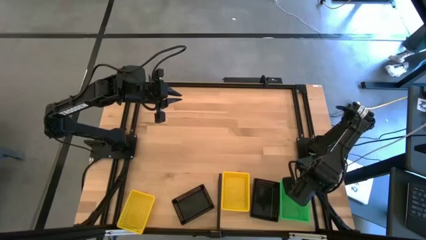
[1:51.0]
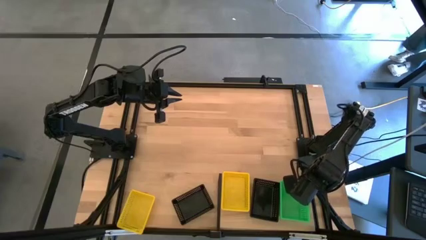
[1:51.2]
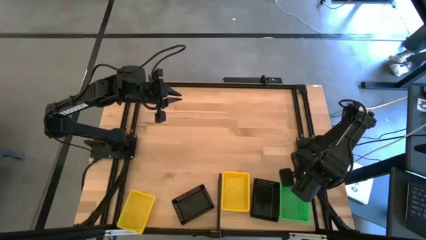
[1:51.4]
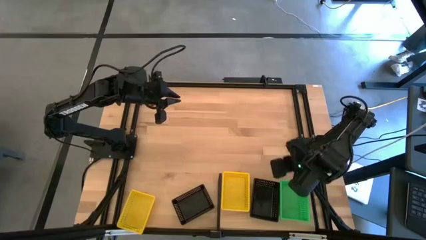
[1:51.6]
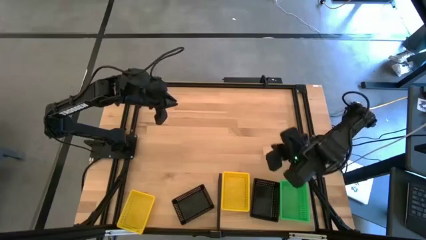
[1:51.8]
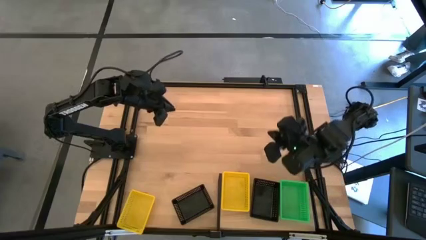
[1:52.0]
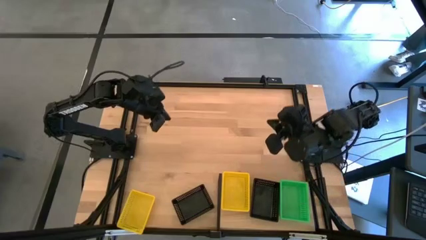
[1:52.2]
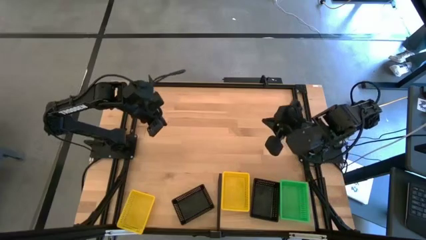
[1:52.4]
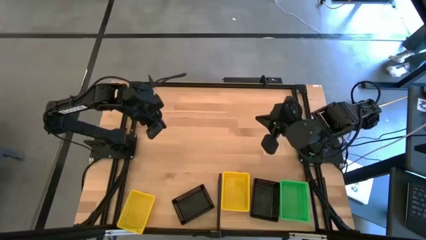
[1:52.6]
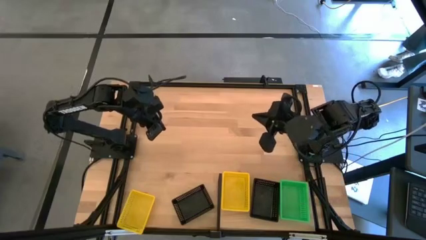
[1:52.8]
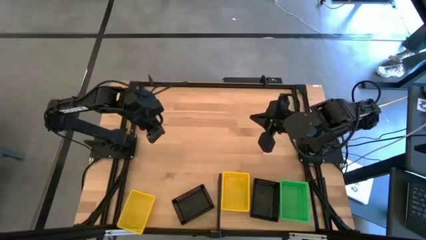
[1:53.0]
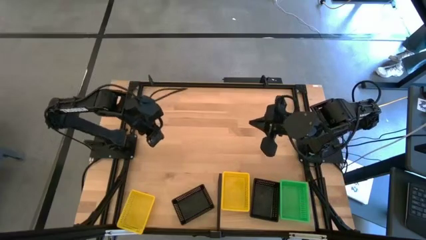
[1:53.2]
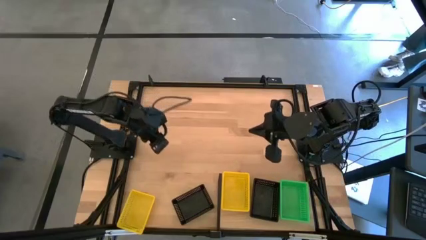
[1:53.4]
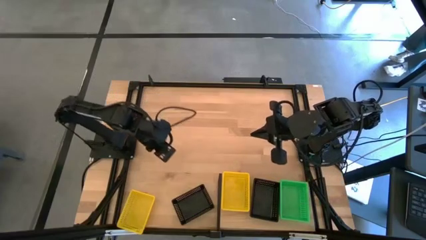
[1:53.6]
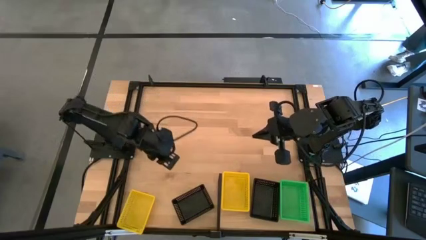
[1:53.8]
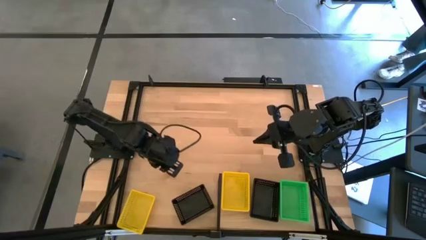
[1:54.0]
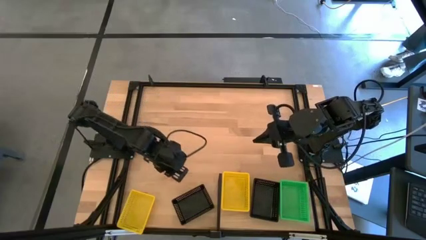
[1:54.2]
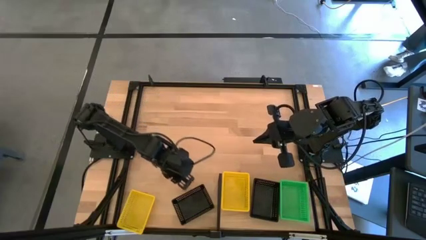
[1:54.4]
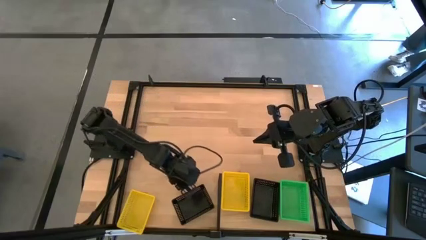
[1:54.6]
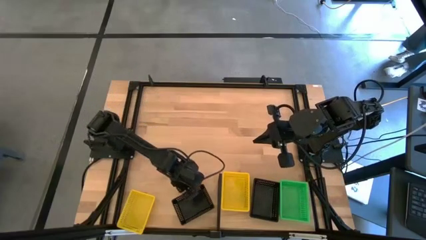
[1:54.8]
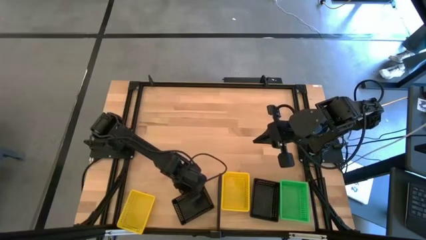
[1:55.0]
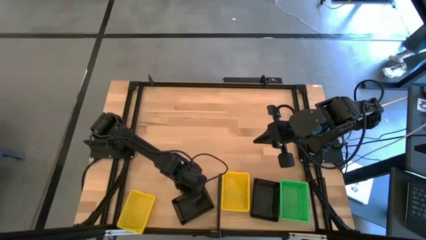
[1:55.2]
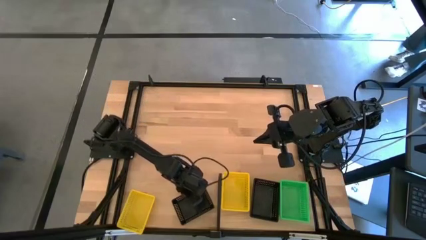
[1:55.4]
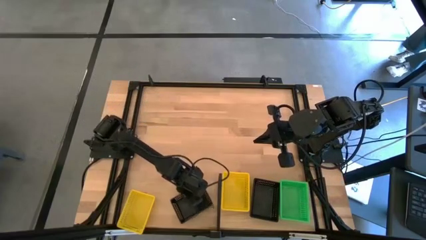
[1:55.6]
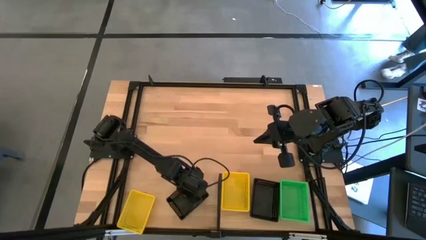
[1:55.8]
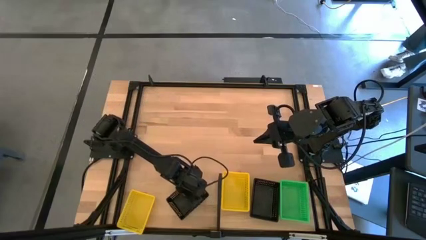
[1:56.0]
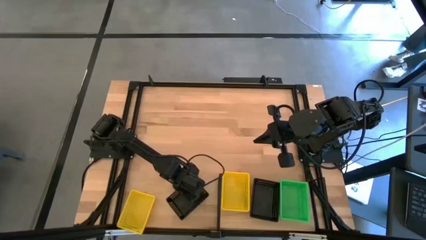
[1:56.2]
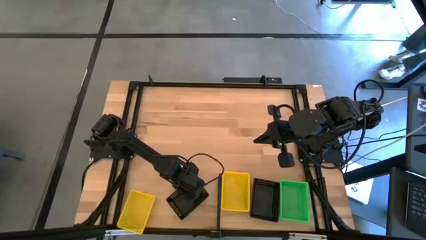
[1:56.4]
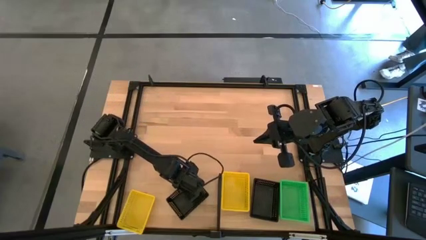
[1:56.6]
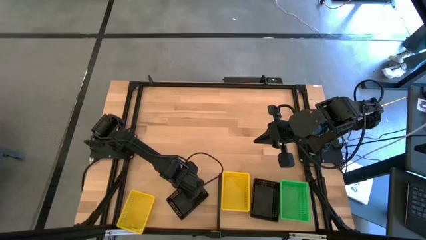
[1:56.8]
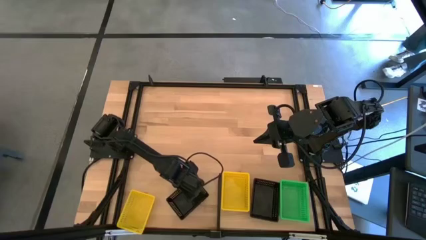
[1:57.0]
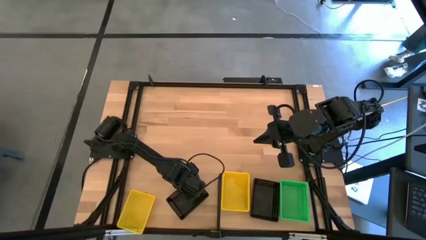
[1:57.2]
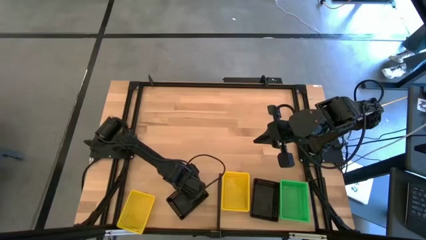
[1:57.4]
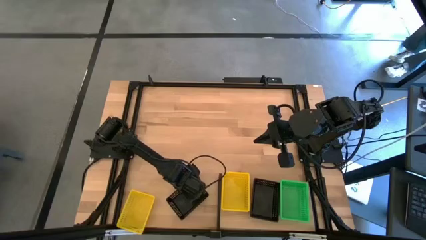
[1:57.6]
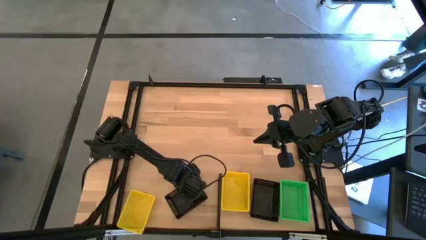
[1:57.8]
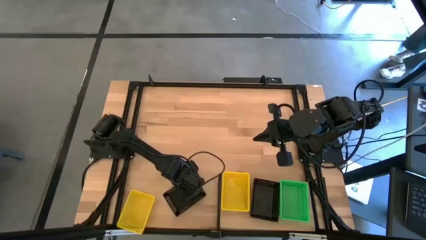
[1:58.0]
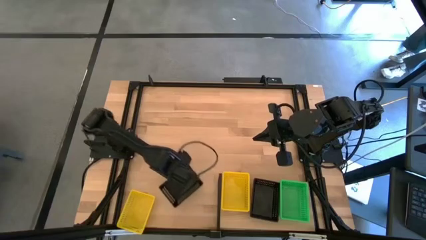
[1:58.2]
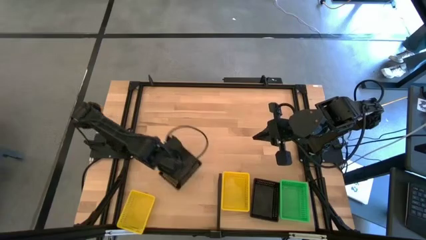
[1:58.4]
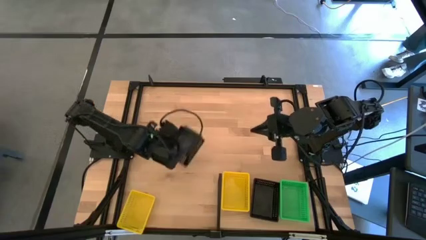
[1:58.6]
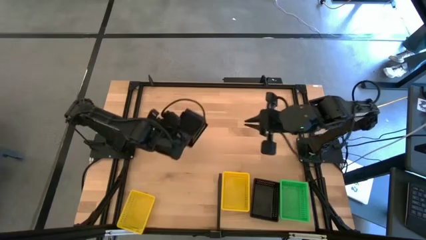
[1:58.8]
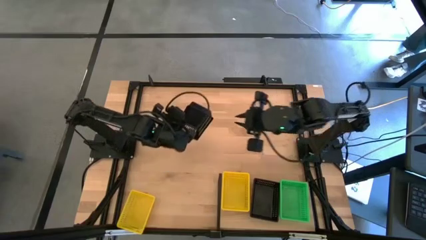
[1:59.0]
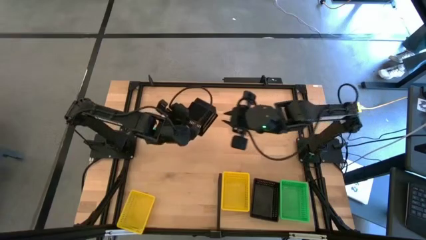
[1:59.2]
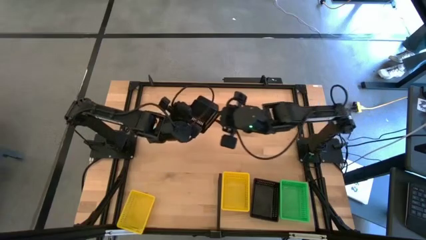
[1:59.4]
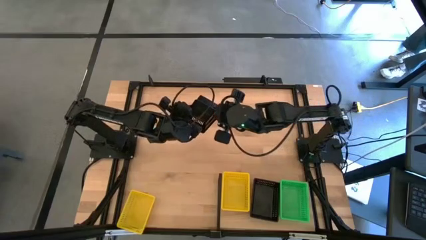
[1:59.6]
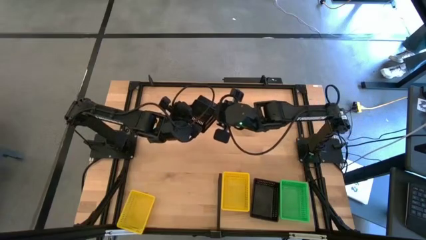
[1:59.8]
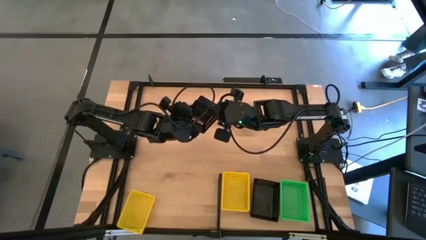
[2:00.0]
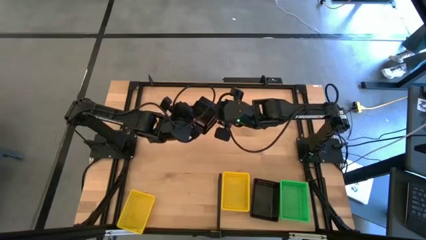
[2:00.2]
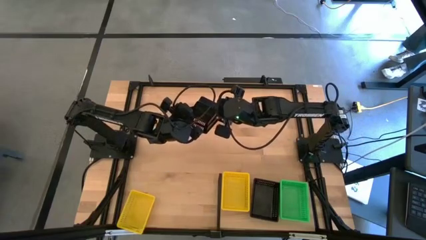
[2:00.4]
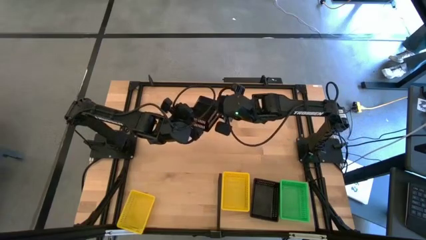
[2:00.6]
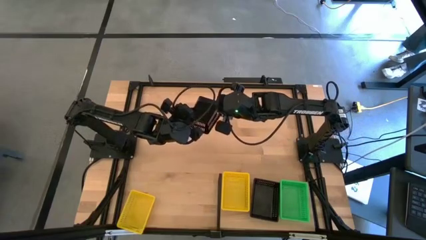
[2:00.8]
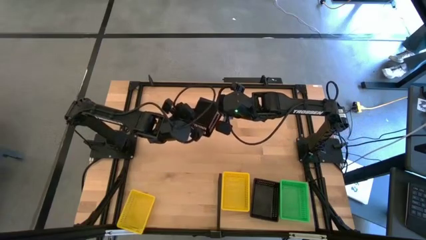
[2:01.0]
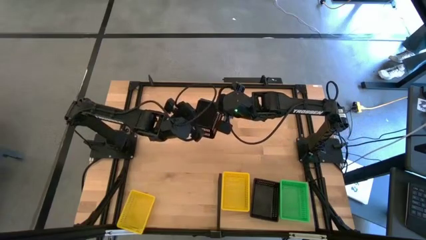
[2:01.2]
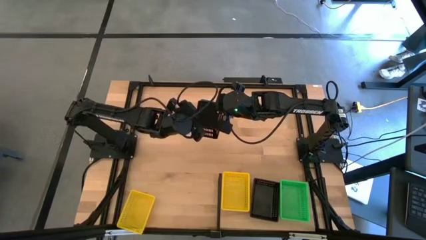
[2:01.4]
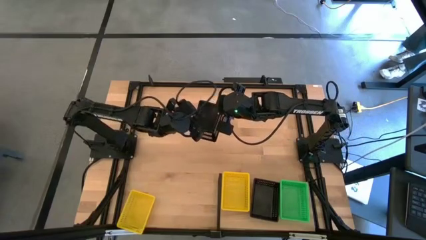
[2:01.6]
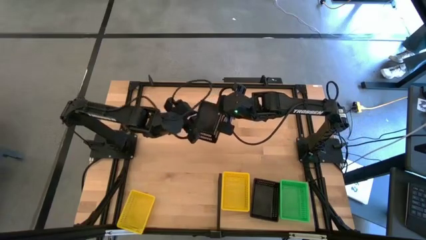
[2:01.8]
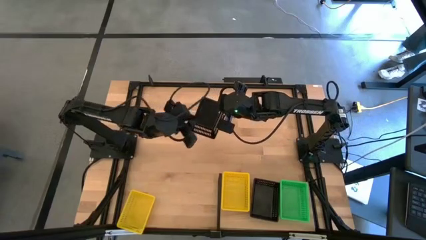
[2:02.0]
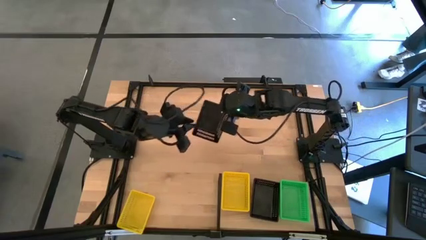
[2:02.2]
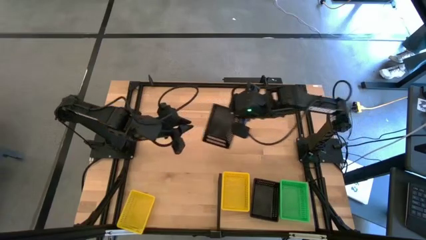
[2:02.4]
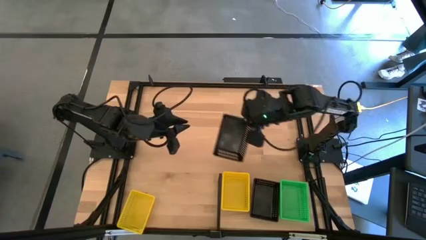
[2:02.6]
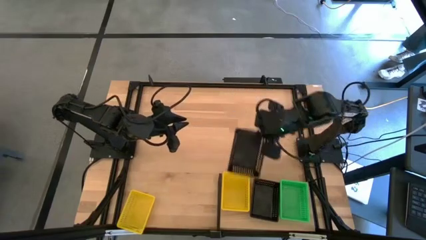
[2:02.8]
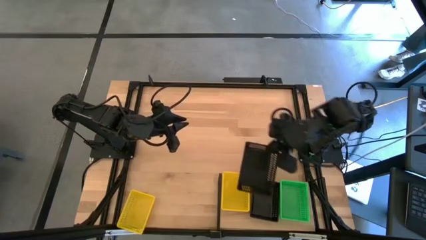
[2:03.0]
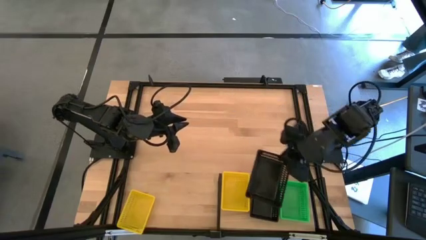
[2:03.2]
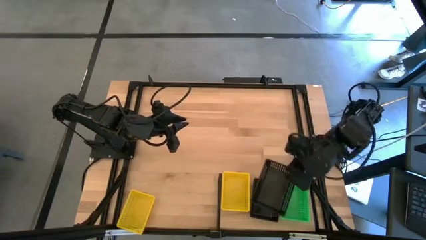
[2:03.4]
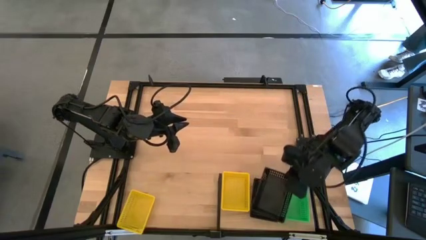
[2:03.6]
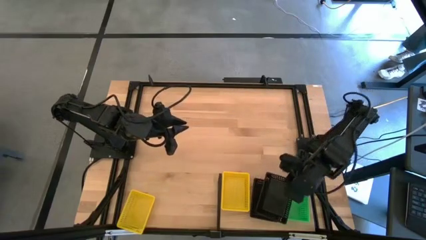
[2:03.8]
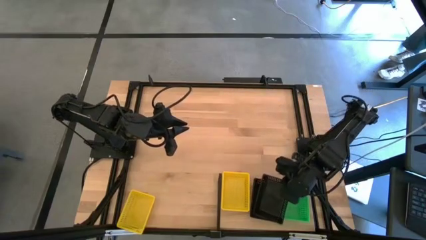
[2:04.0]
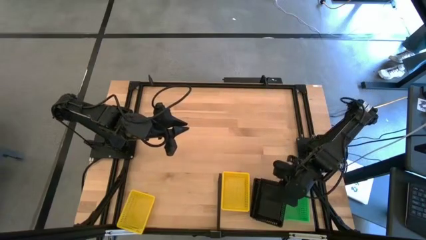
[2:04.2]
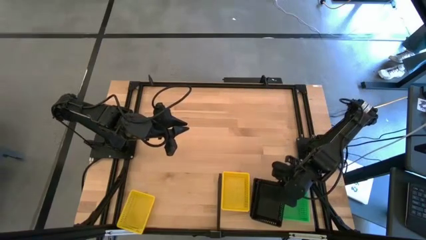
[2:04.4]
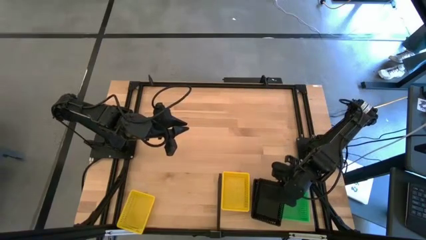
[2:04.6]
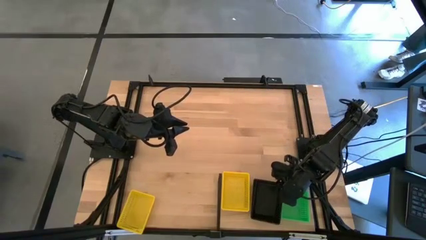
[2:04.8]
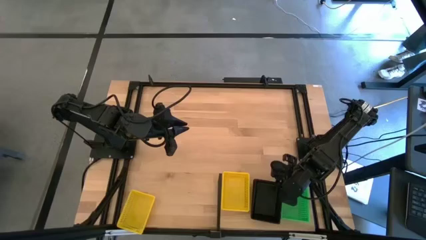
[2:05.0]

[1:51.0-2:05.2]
Task: Stack baskets on shelf by color
Stack the black bin on top of the black bins on the shelf

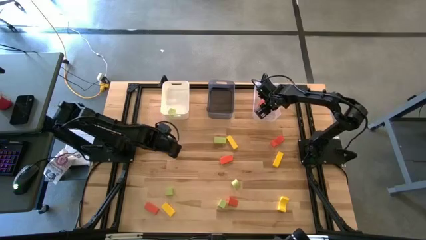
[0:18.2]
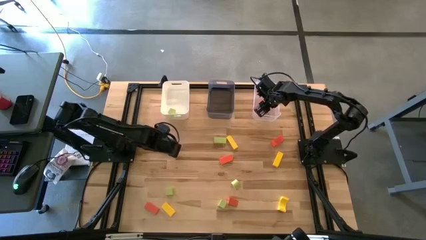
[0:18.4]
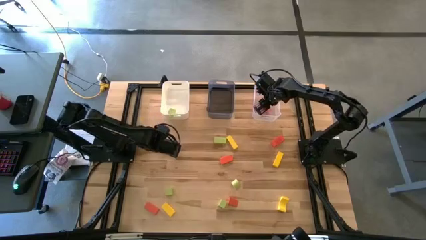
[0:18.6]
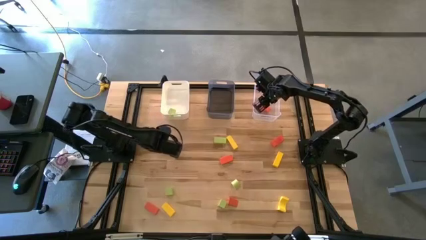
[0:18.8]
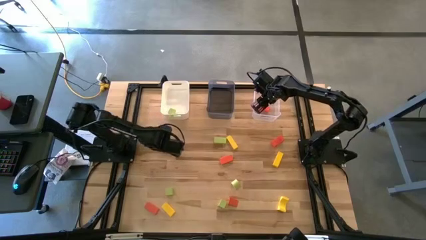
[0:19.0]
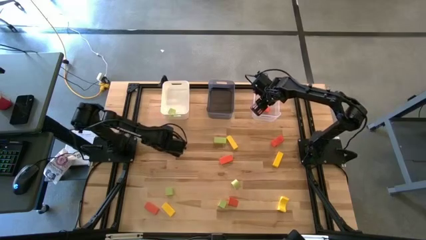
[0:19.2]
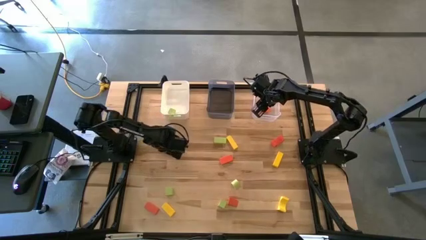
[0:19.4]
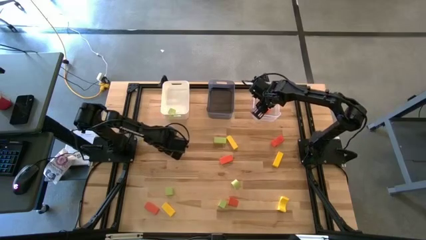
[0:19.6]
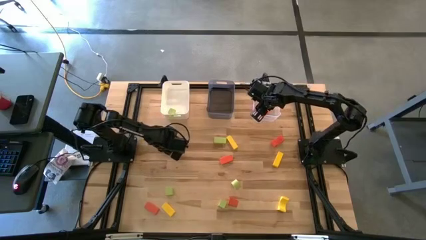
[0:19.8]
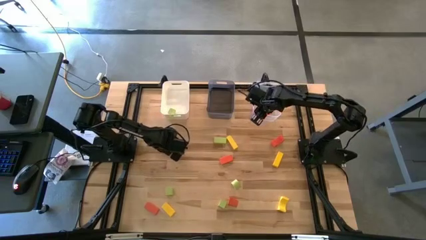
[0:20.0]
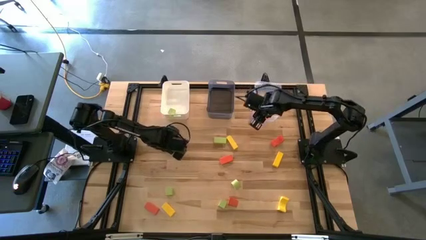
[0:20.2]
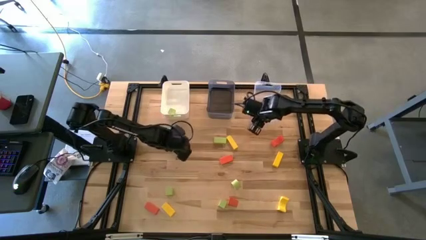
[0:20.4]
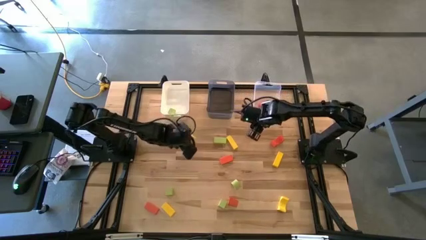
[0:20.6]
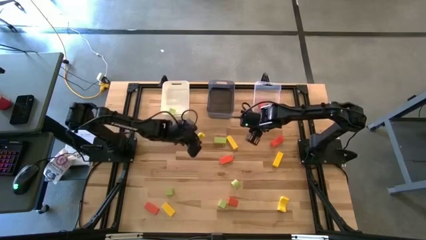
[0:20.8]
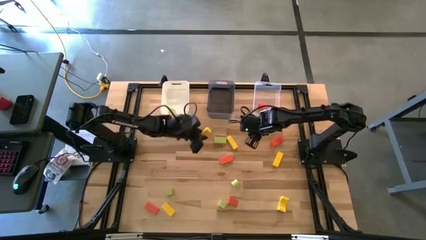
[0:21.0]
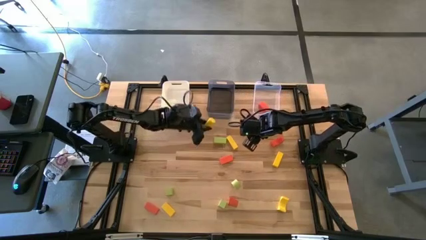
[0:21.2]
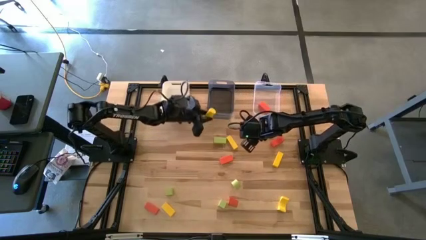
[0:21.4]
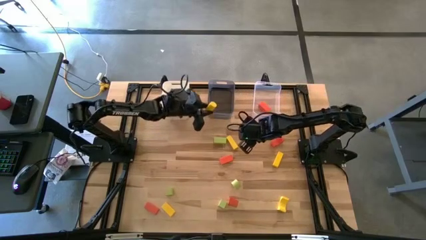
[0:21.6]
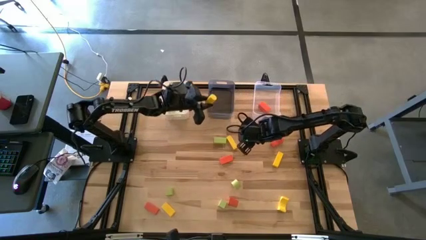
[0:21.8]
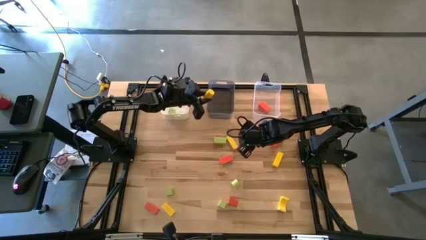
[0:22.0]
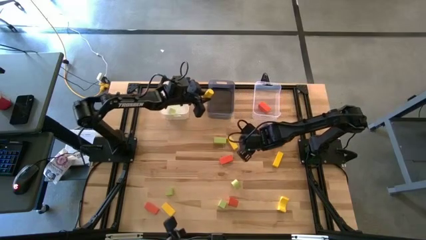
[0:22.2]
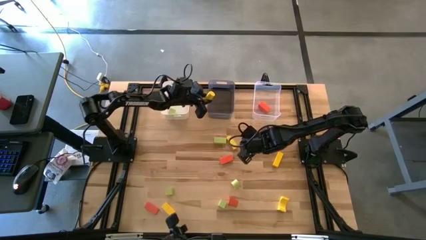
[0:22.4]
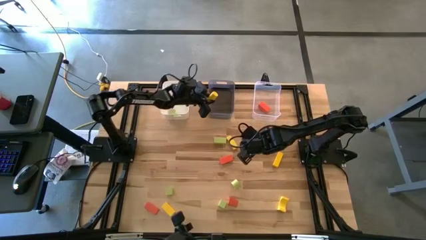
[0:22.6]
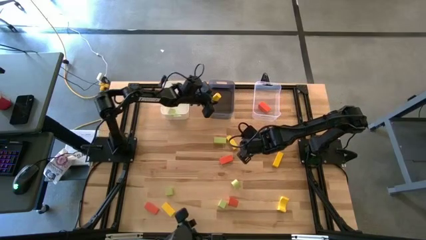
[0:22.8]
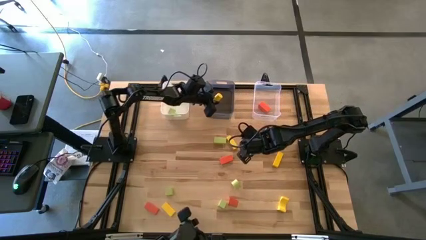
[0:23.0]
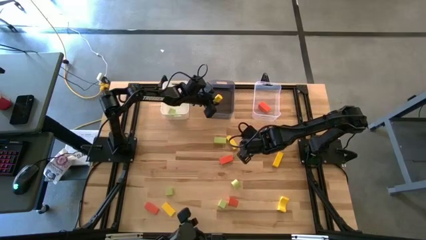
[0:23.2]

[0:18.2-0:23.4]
Task: Sort & place blocks by color
Put the yellow block into the black bin
